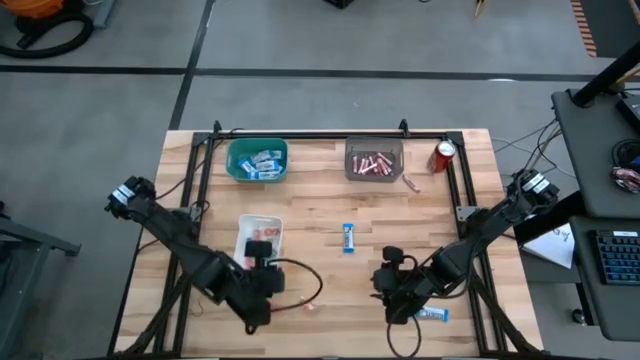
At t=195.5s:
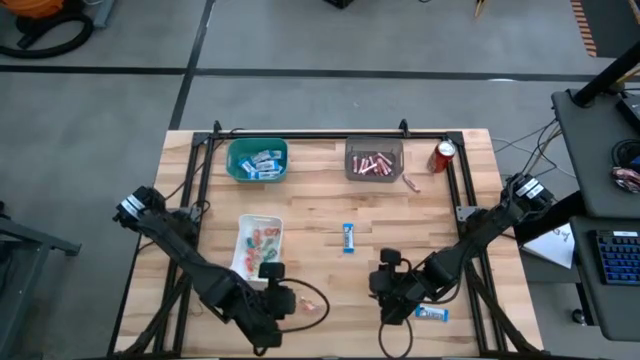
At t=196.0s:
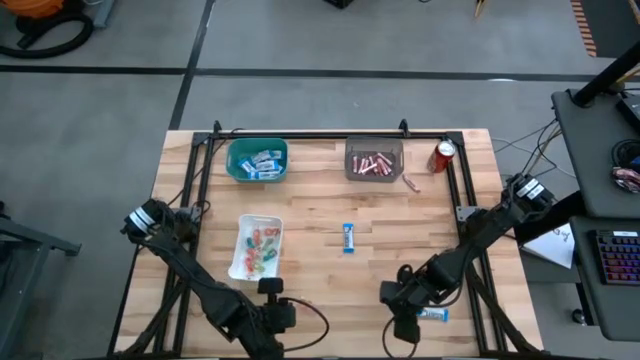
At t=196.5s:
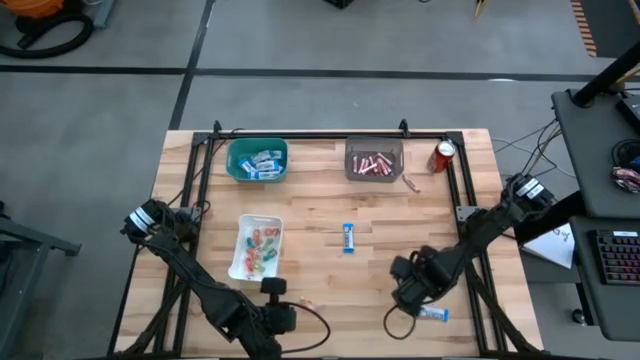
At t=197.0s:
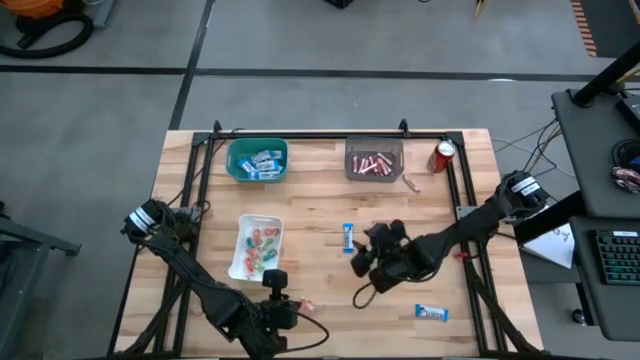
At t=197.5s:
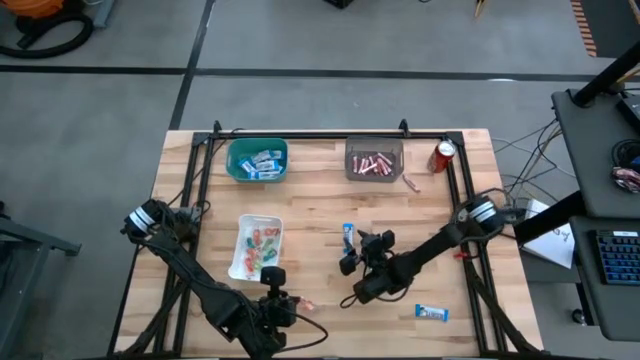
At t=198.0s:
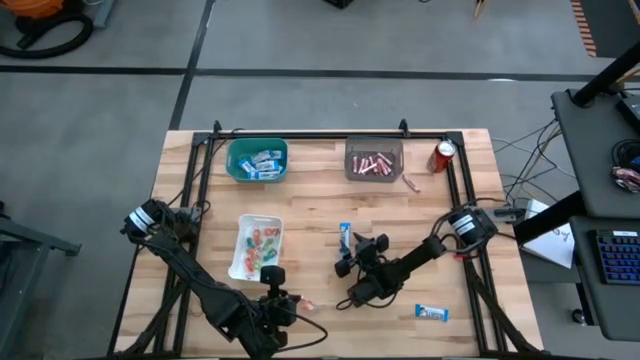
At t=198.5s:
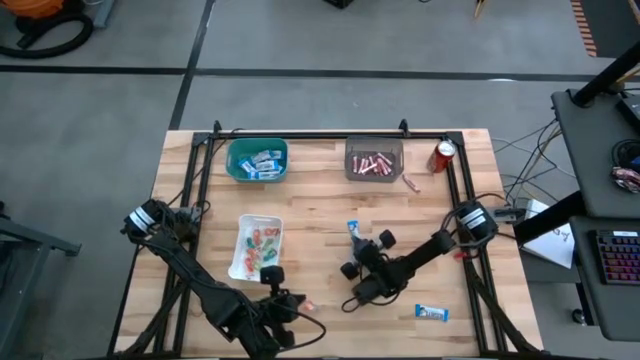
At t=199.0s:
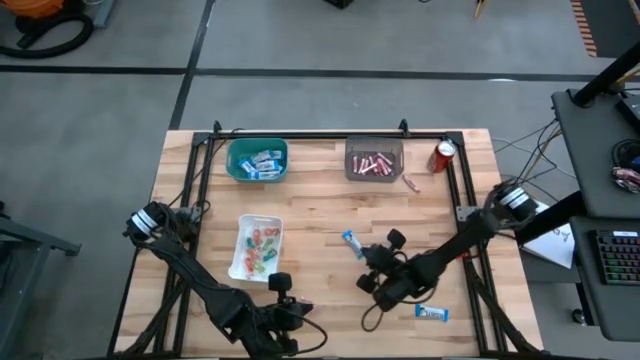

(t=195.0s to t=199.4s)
Task: Sort candy
Put the white chocolate bar into the green bin

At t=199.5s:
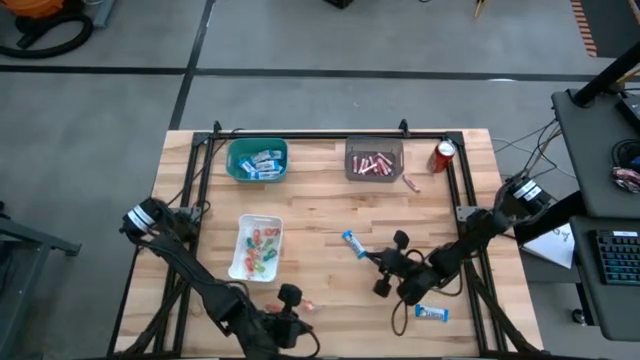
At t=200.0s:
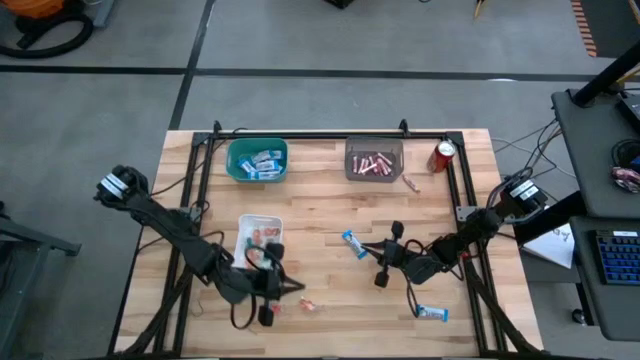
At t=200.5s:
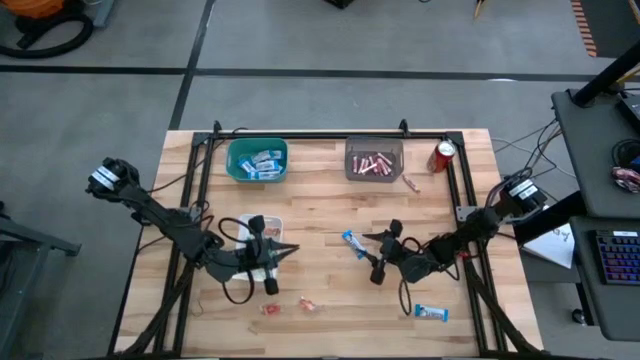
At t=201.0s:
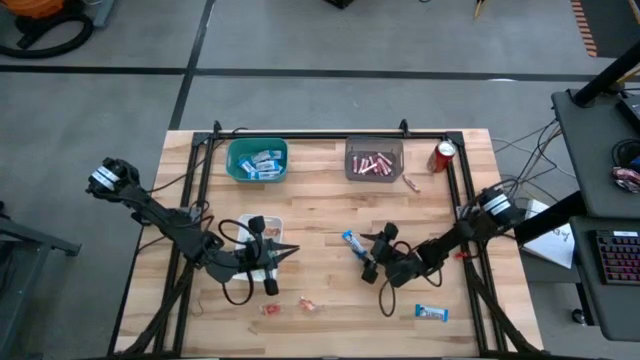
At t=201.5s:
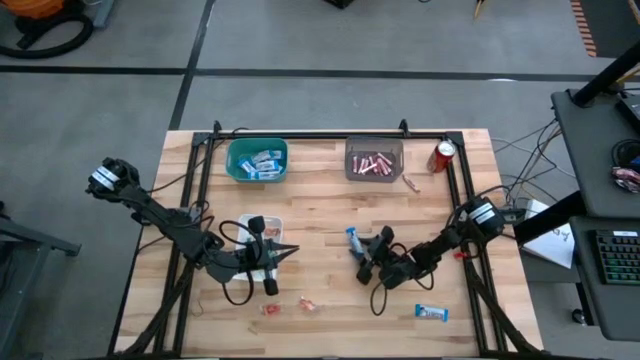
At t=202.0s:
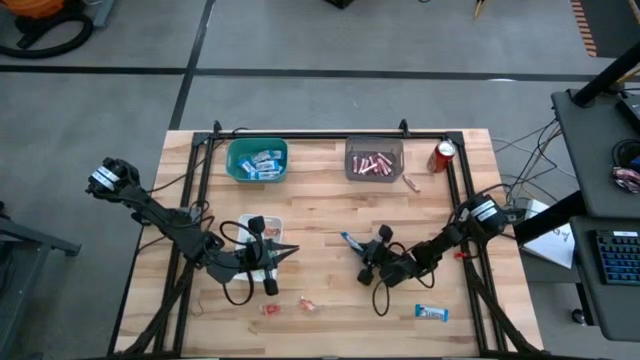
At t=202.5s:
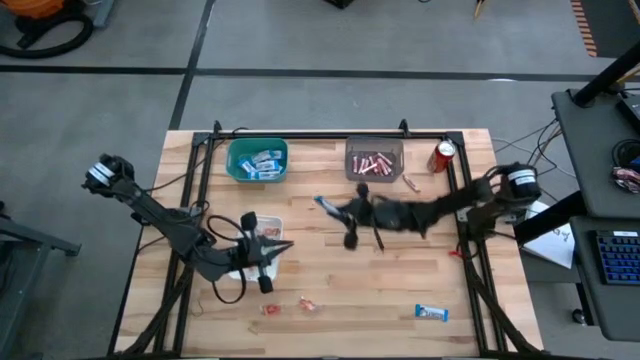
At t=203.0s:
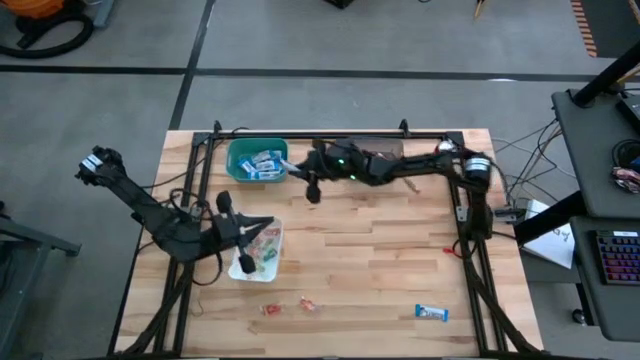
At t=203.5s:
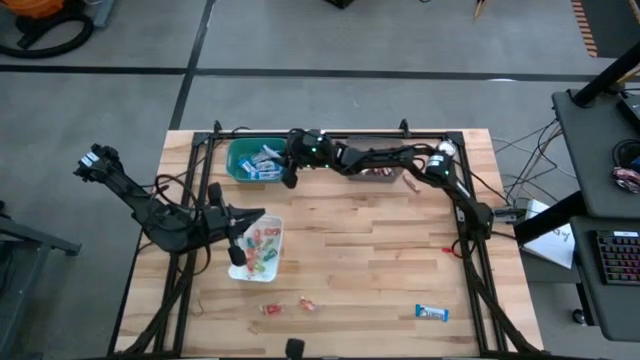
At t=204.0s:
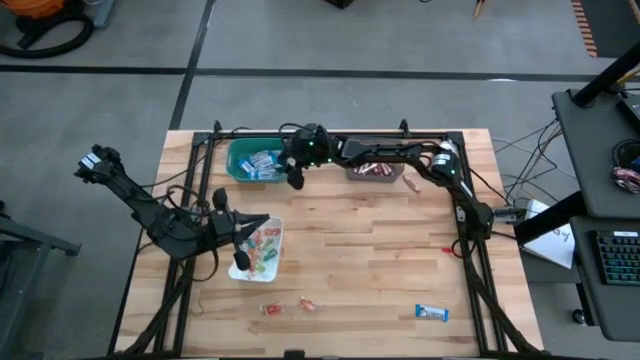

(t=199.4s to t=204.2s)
Put the white chocolate bar into the green bin

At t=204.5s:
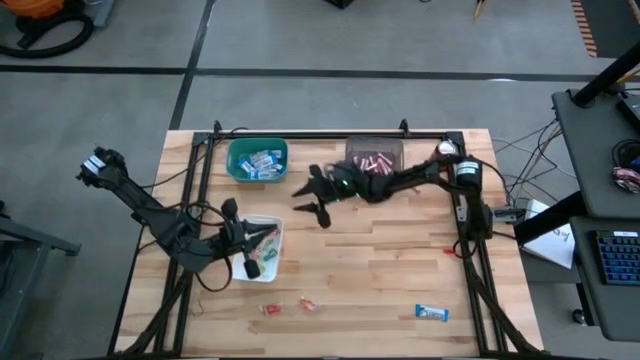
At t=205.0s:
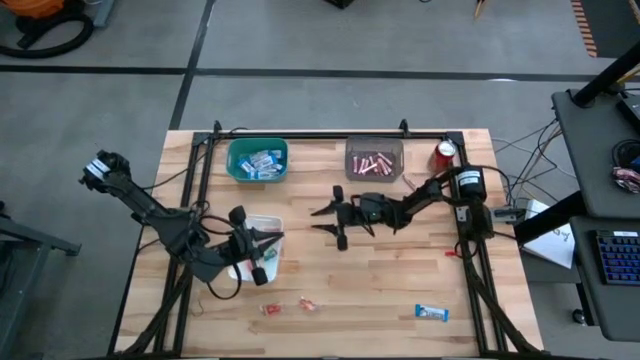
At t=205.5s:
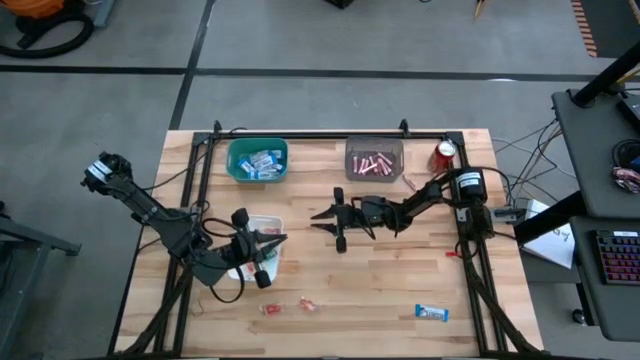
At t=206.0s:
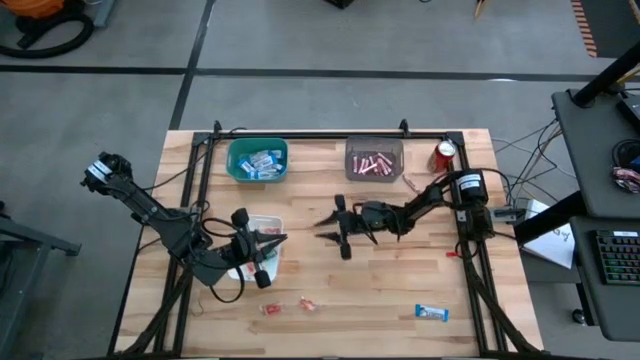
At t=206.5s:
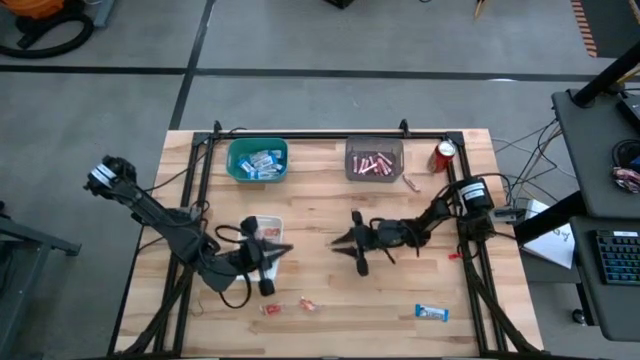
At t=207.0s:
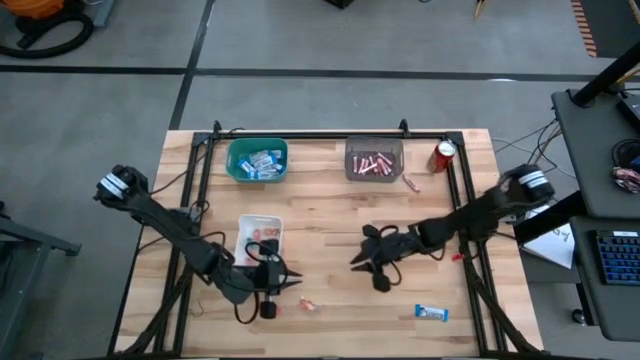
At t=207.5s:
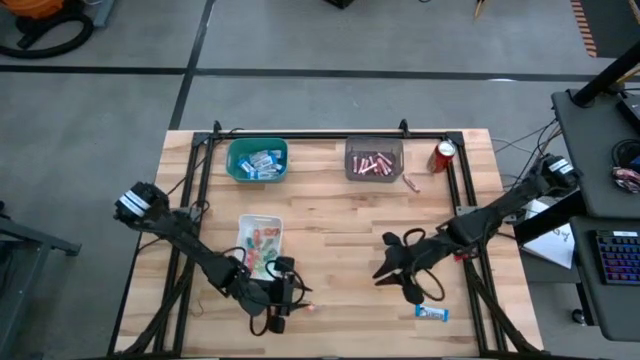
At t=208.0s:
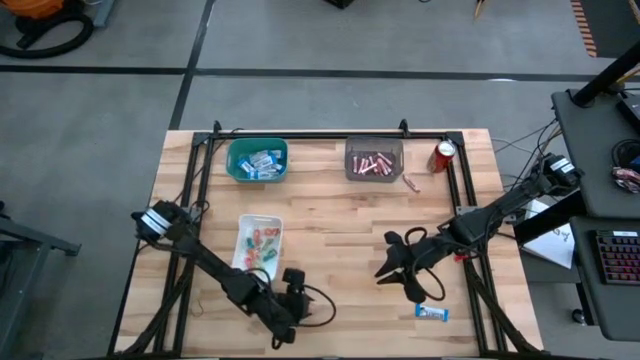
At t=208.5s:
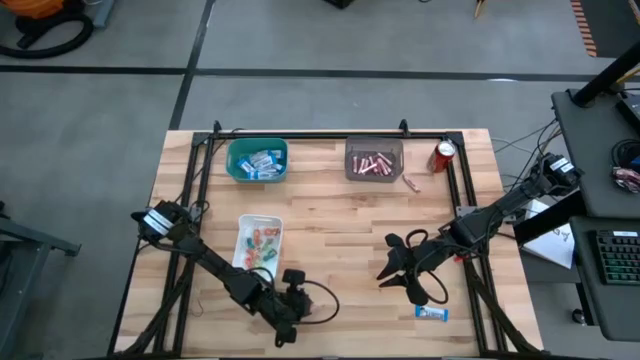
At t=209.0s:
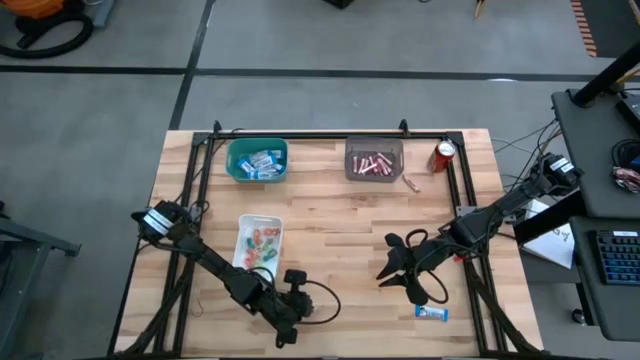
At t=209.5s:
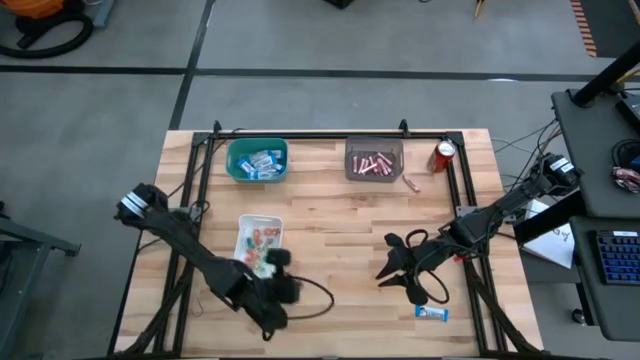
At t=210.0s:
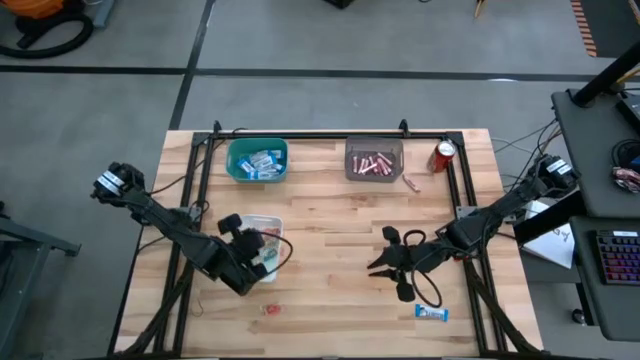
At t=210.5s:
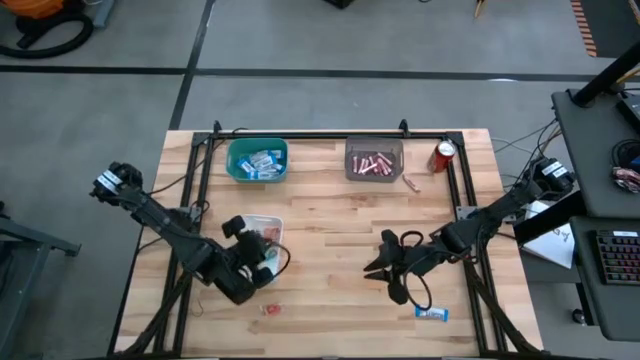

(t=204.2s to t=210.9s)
Put the orange gummy candy into the white bin

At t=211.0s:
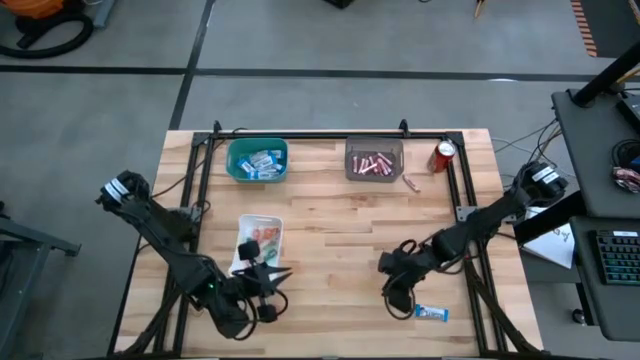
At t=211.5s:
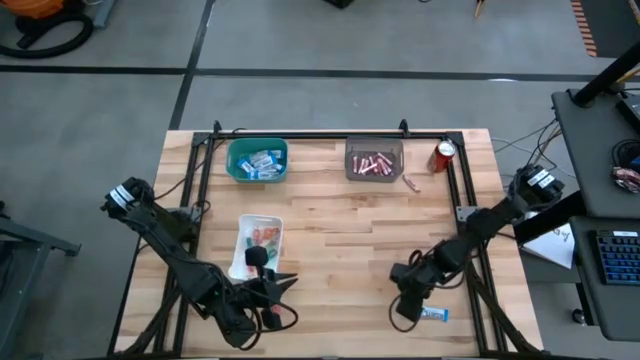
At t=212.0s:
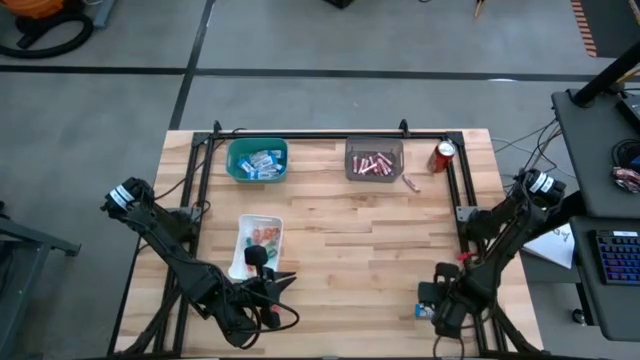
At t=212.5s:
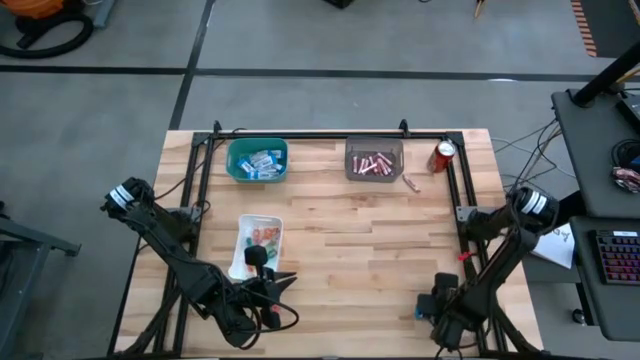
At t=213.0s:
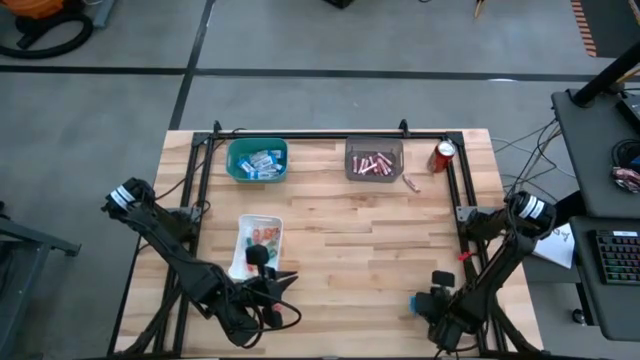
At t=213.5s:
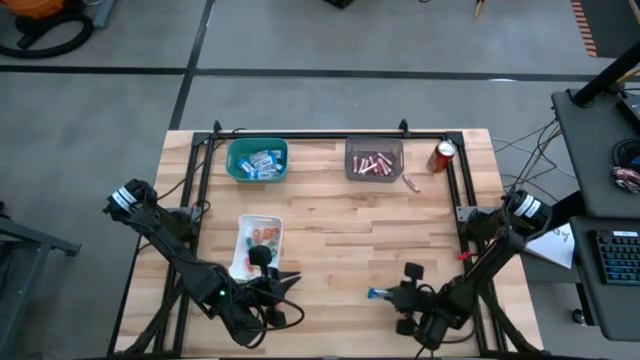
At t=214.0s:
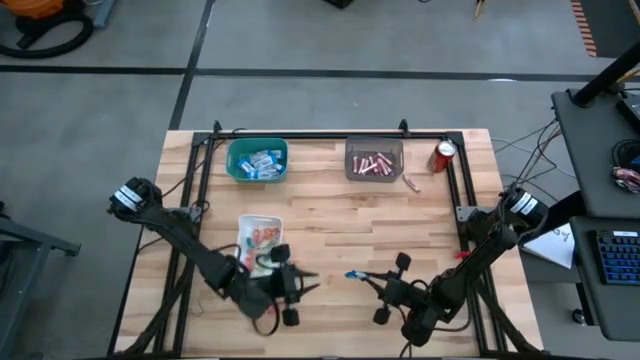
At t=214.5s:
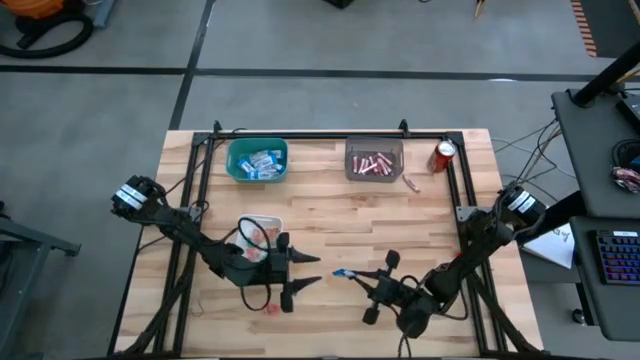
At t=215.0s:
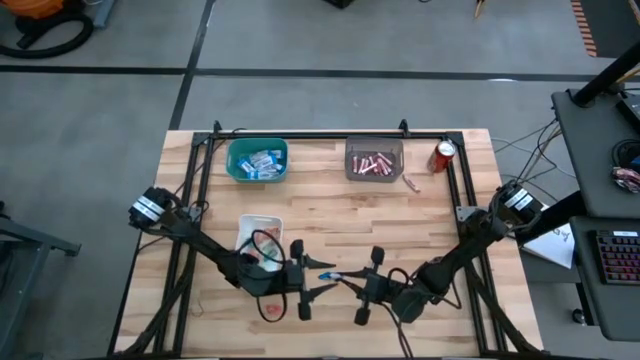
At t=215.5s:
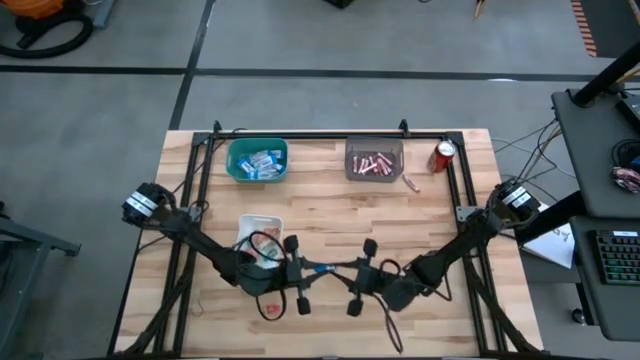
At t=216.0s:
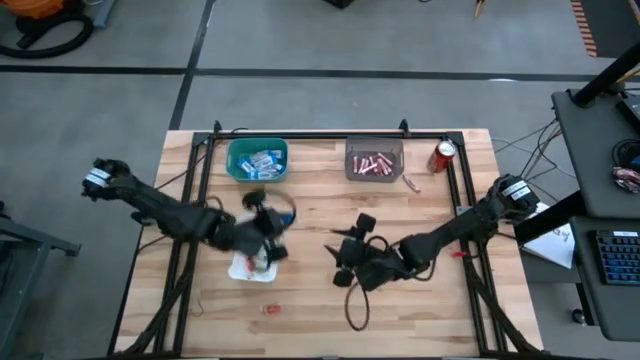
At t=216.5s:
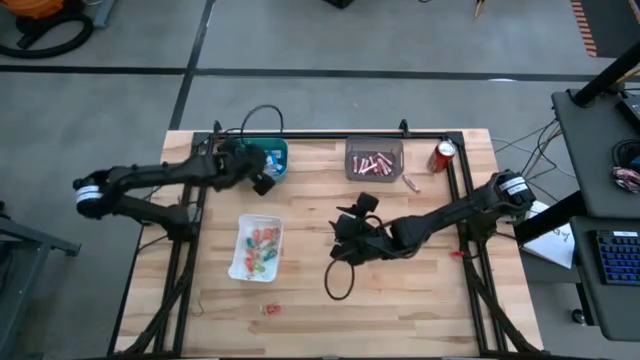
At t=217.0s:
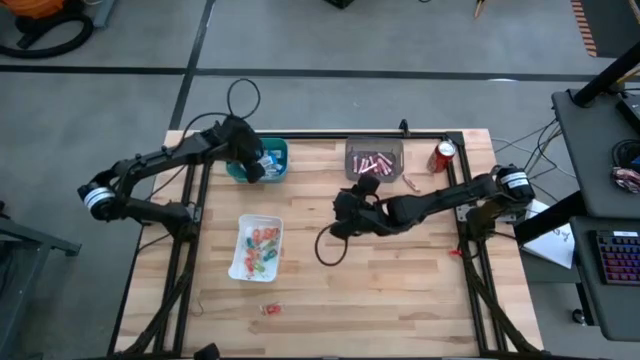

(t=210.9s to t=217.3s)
Put the white chocolate bar into the green bin
